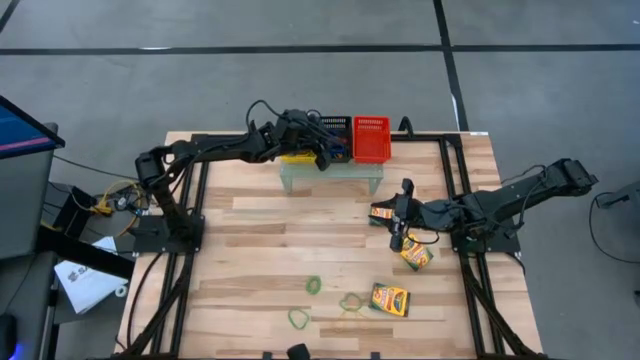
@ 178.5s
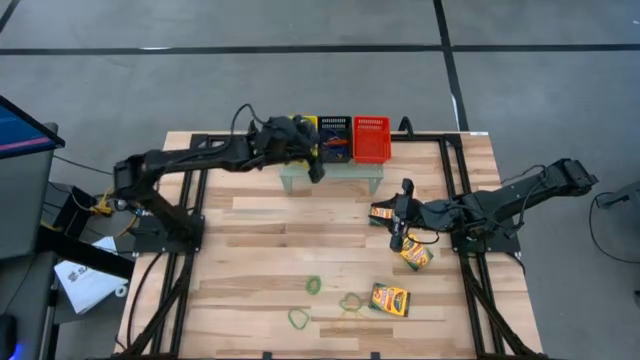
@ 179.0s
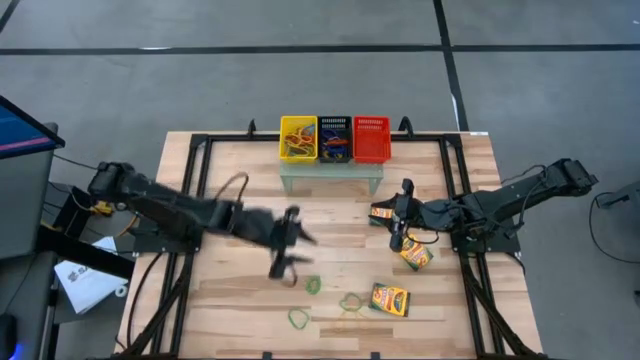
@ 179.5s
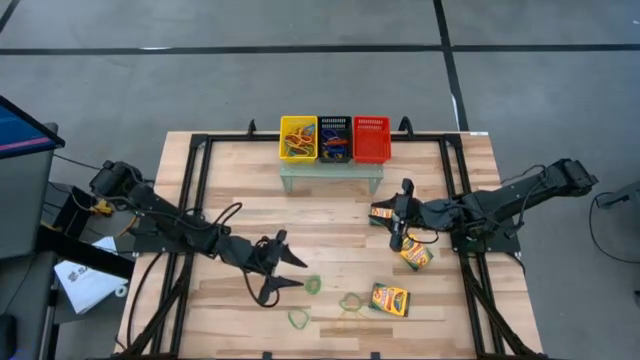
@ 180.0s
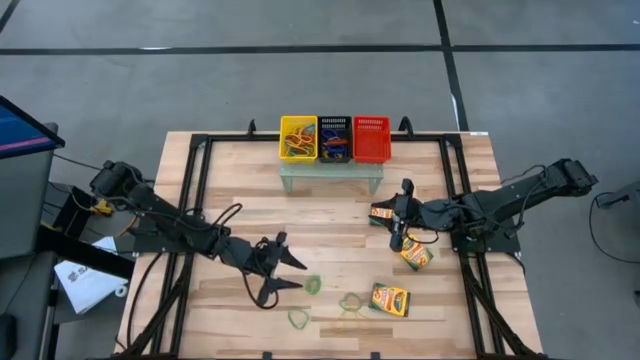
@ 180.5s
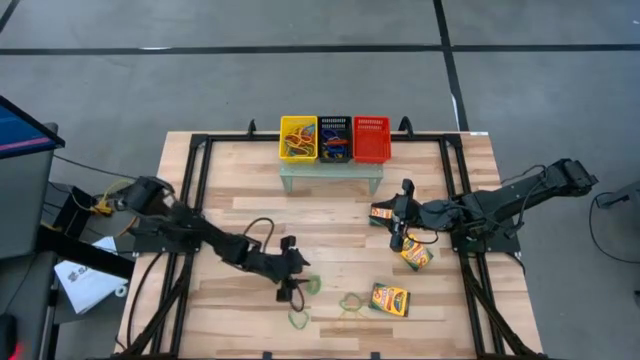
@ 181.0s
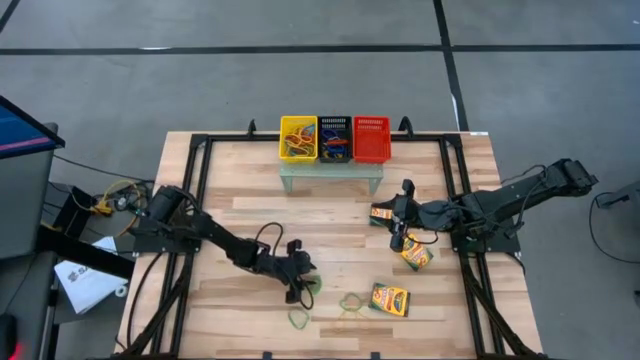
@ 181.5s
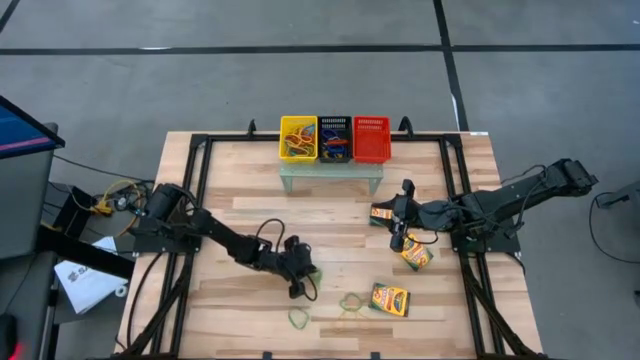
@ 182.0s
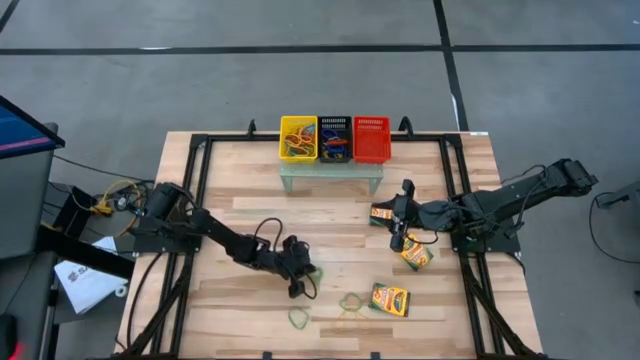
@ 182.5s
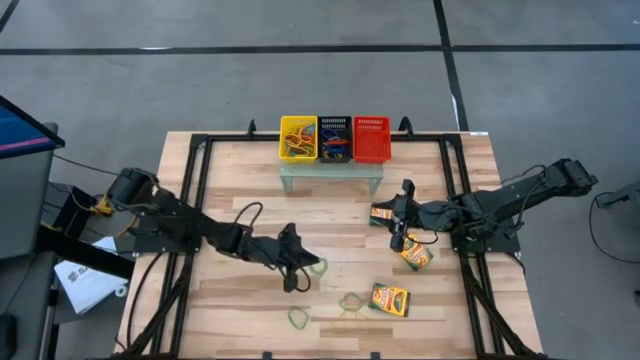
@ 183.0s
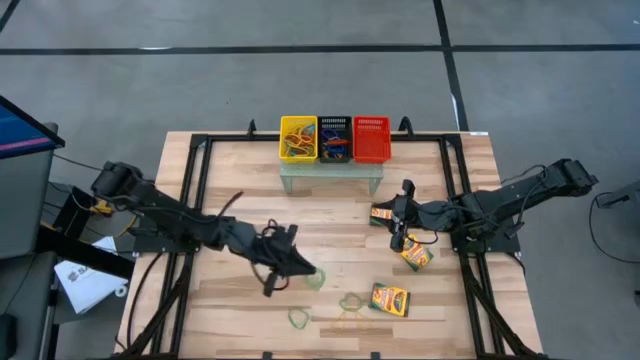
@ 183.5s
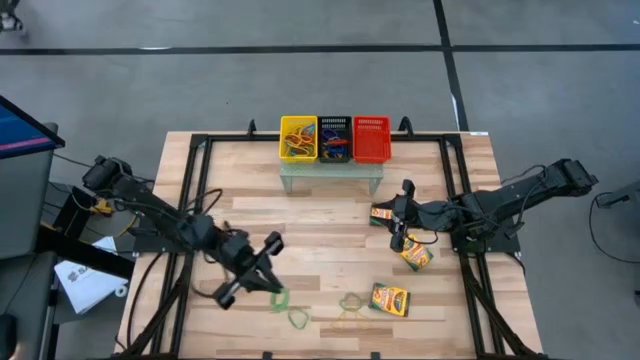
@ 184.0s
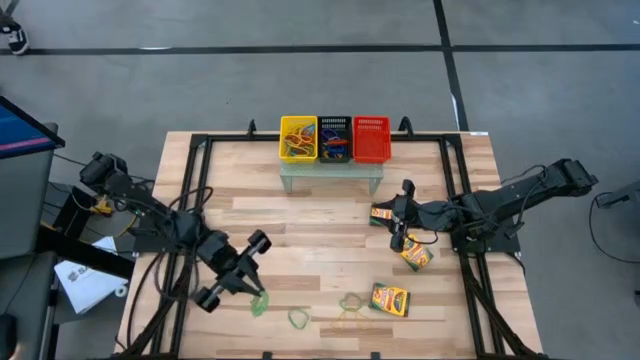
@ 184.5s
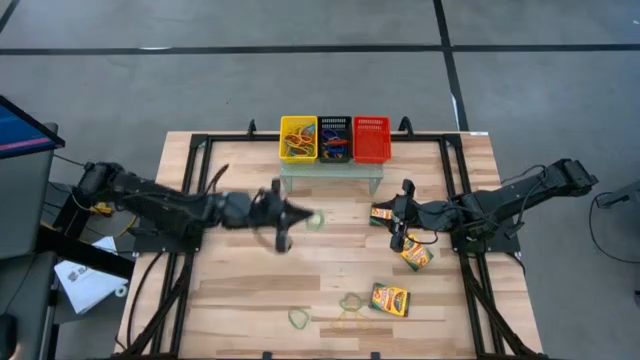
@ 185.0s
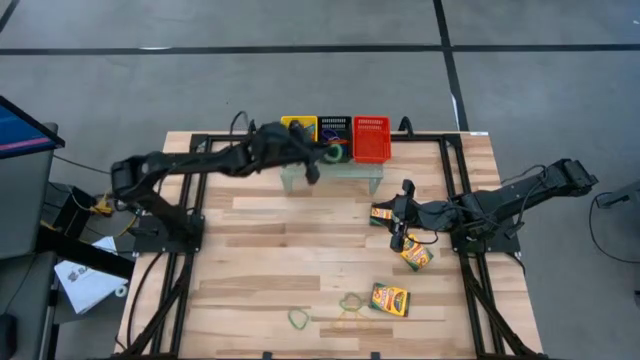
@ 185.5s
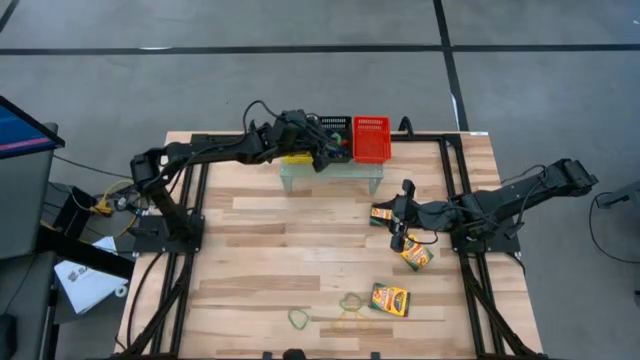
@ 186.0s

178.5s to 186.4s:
Task: Pick & Place Office Desk Supplies
Put the green spring keychain into the black bin on the shelf

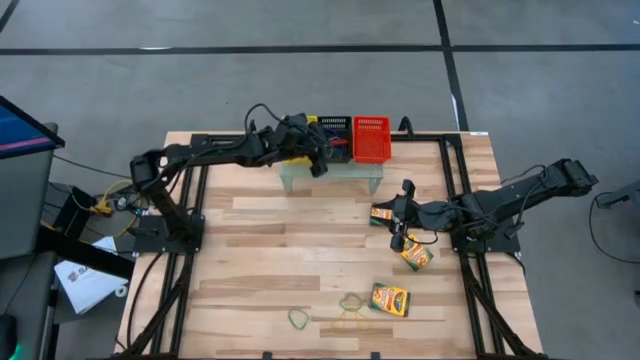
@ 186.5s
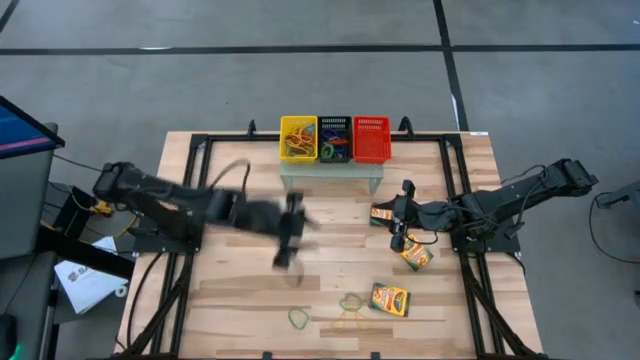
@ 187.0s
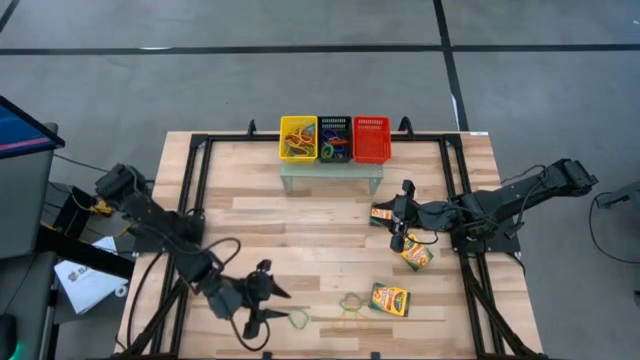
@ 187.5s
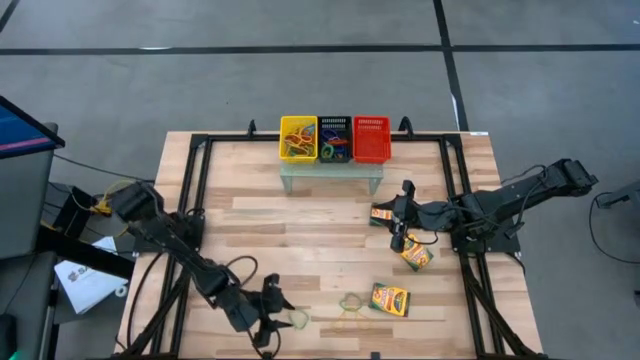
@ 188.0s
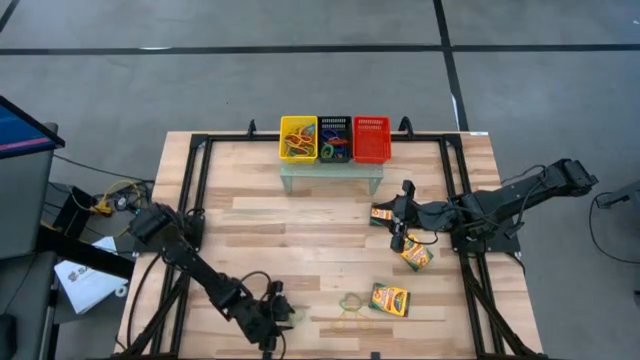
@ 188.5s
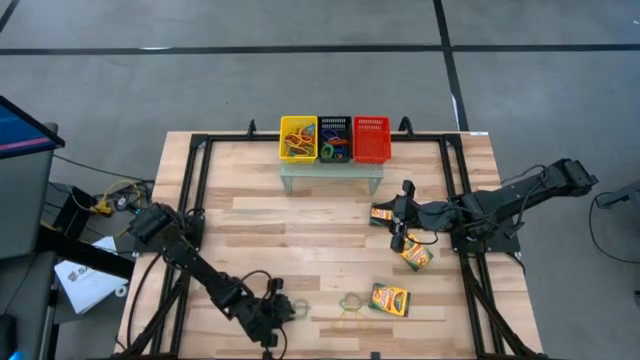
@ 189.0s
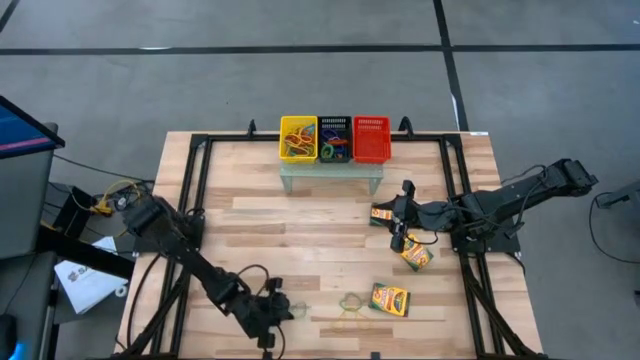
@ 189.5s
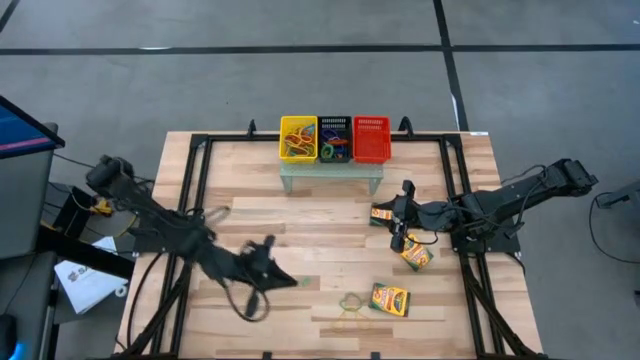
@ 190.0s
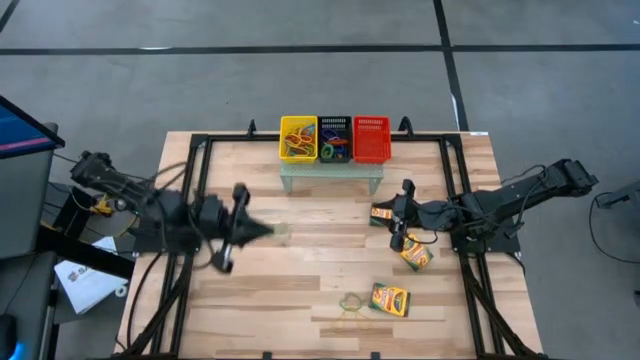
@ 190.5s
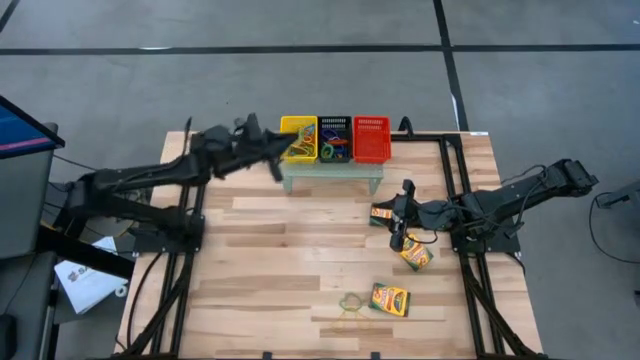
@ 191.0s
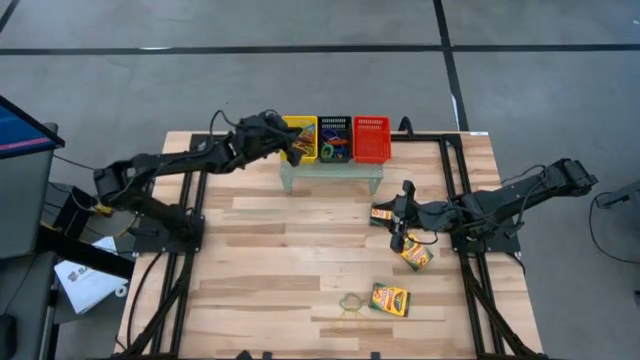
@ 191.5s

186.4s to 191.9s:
Put the left small green rubber band into the yellow bin on the shelf

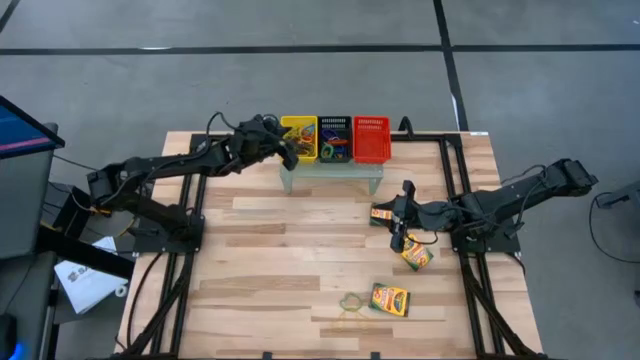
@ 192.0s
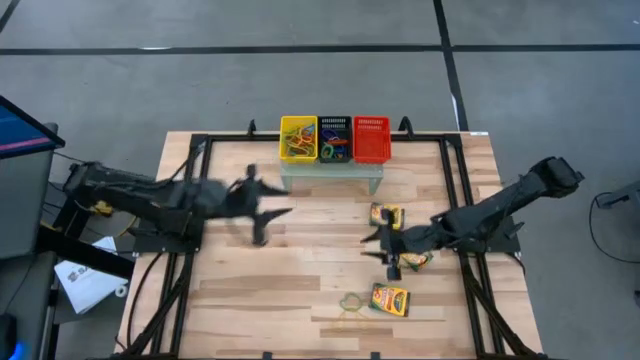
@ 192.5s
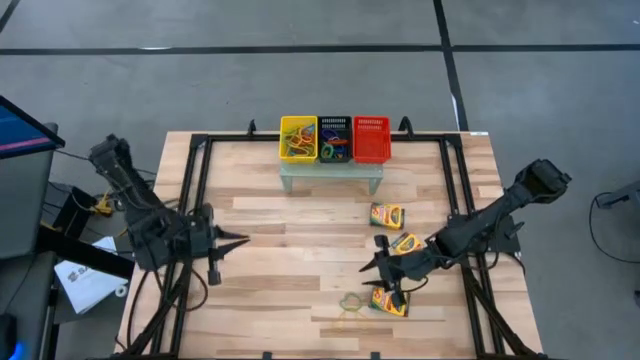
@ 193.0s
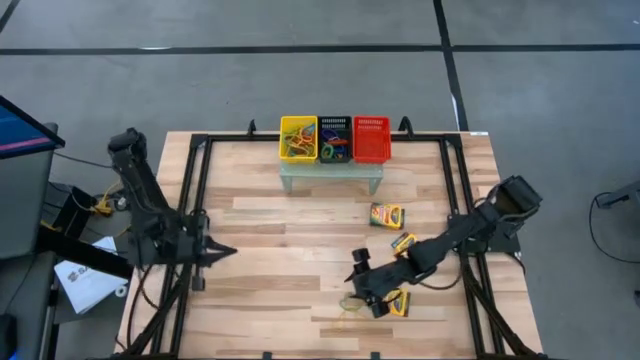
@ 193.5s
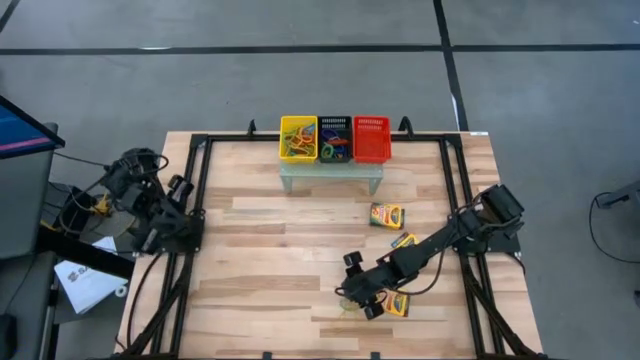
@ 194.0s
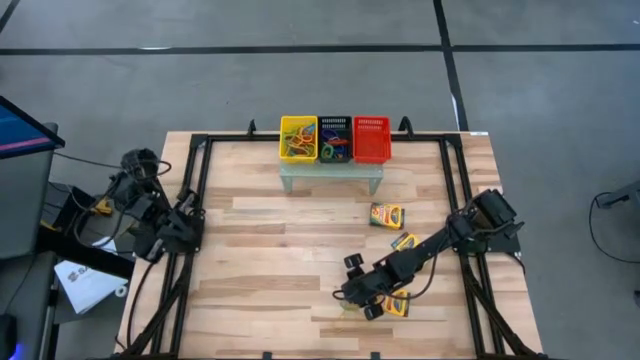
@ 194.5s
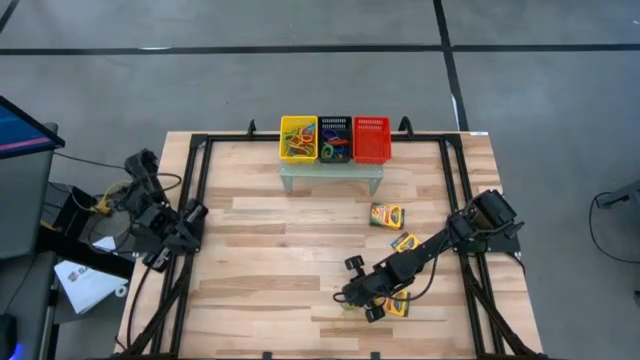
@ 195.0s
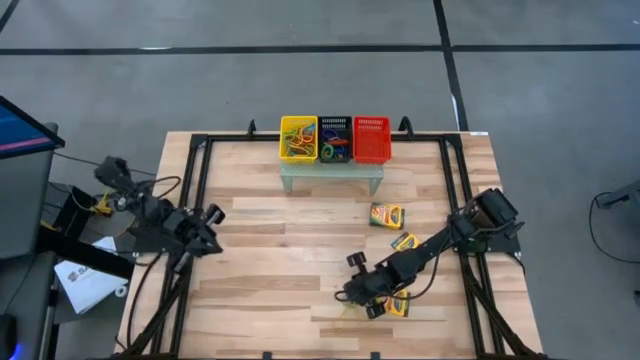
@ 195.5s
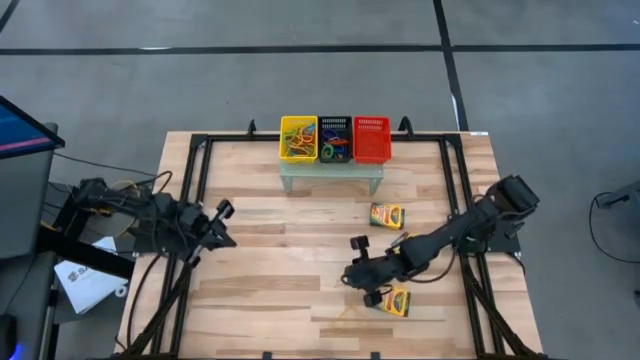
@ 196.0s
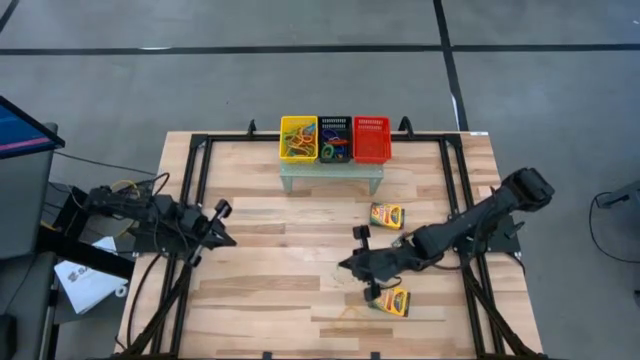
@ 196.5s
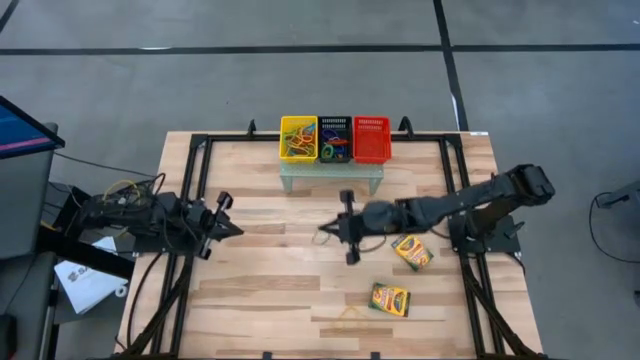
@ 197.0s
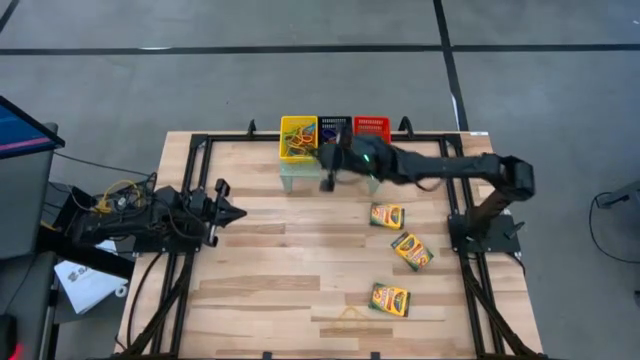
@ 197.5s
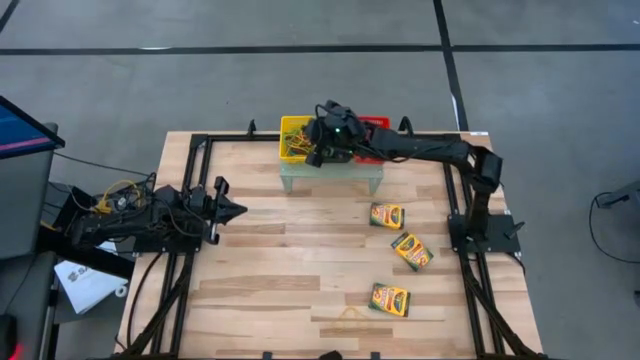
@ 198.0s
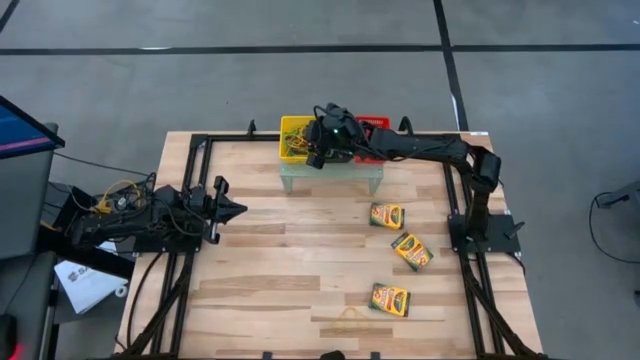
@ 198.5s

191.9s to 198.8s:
Put the small green rubber band into the yellow bin on the shelf
